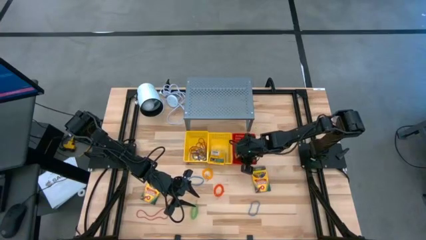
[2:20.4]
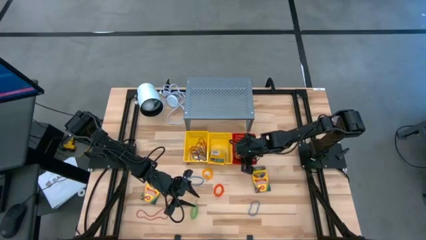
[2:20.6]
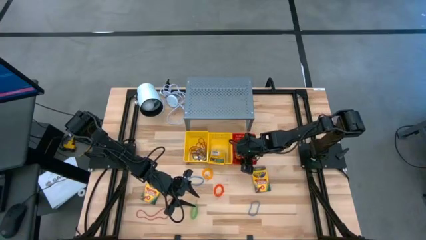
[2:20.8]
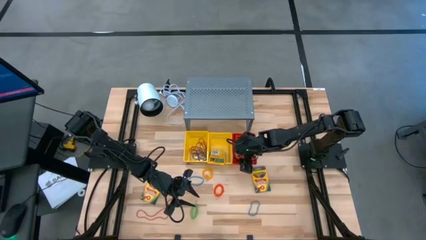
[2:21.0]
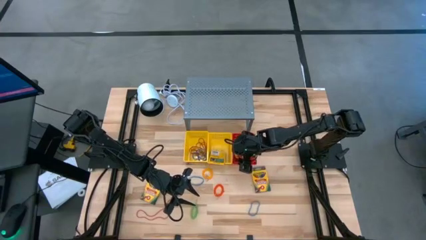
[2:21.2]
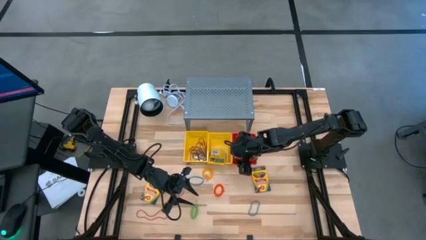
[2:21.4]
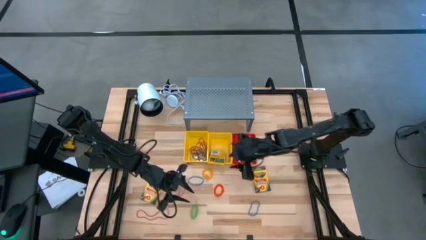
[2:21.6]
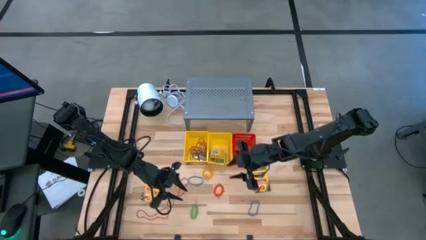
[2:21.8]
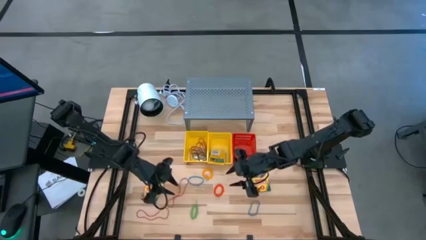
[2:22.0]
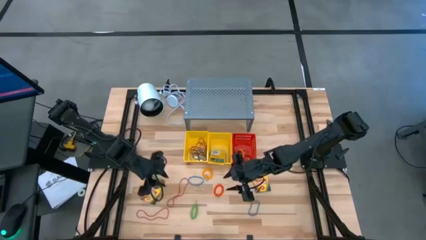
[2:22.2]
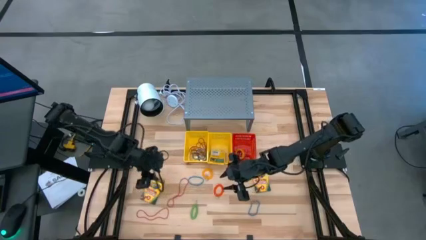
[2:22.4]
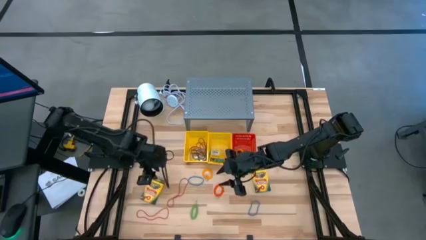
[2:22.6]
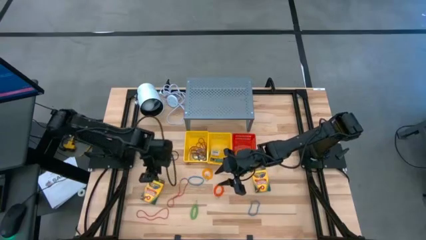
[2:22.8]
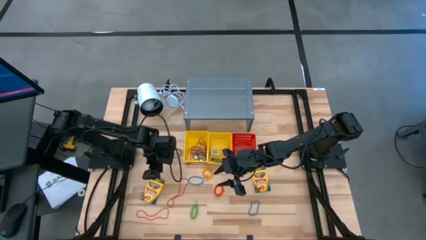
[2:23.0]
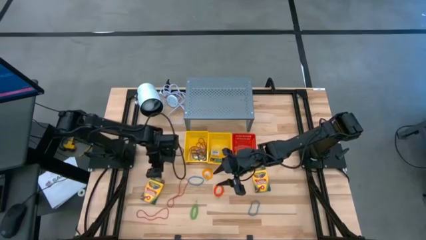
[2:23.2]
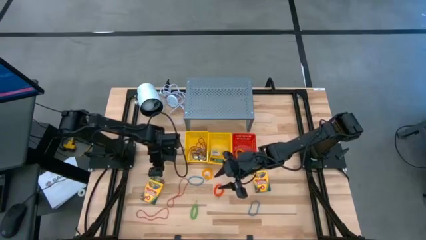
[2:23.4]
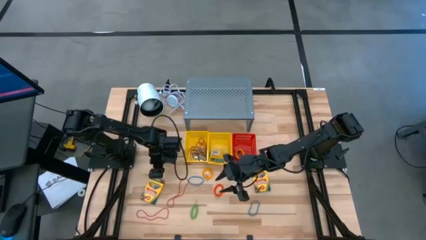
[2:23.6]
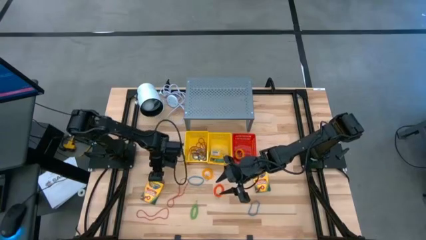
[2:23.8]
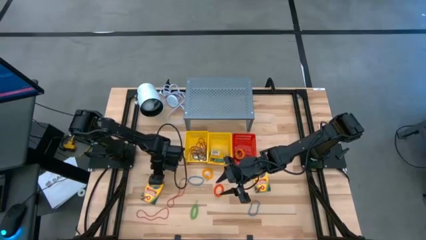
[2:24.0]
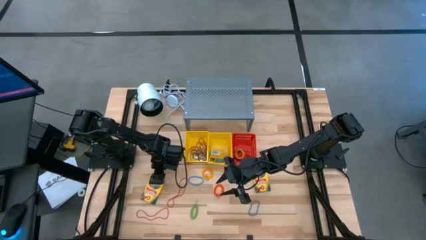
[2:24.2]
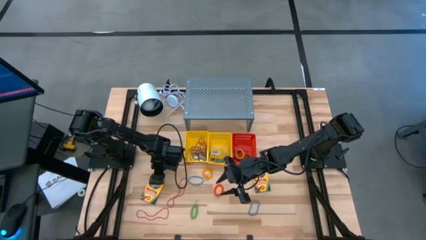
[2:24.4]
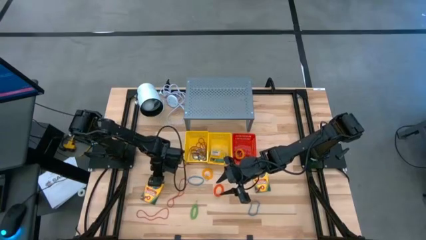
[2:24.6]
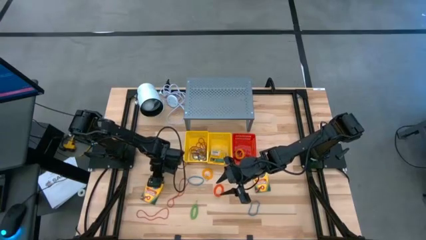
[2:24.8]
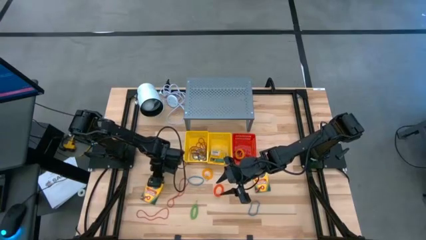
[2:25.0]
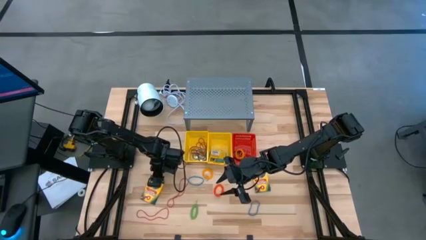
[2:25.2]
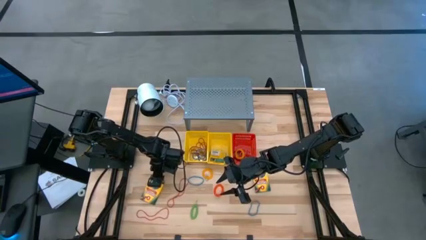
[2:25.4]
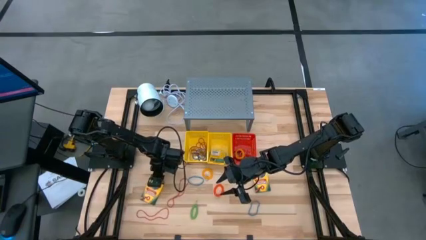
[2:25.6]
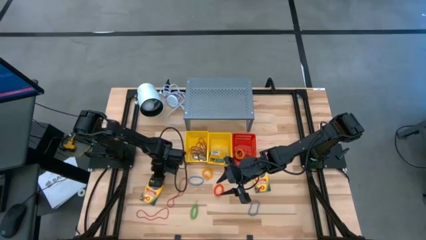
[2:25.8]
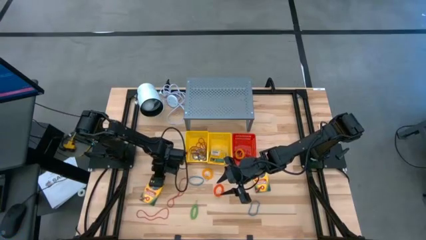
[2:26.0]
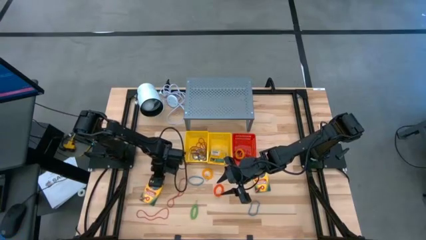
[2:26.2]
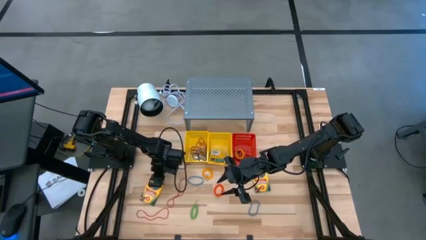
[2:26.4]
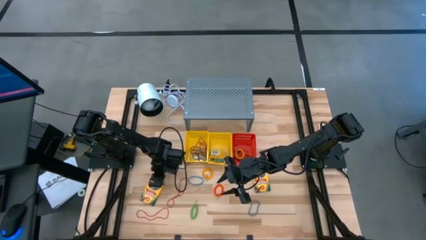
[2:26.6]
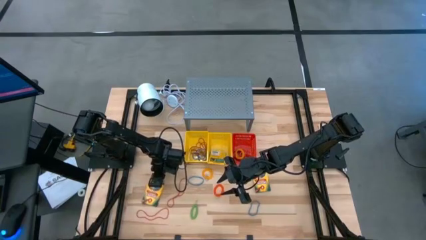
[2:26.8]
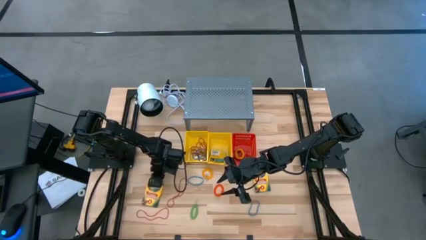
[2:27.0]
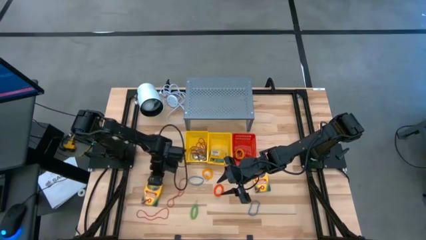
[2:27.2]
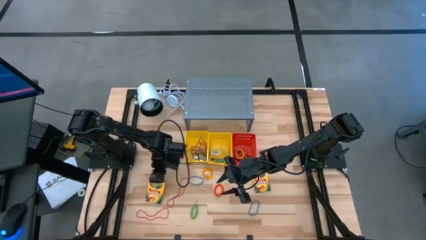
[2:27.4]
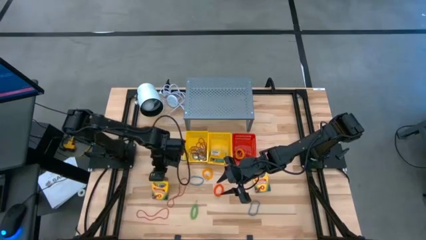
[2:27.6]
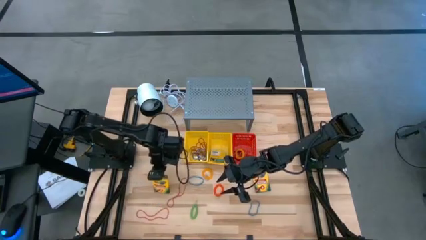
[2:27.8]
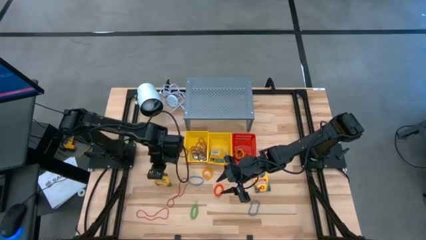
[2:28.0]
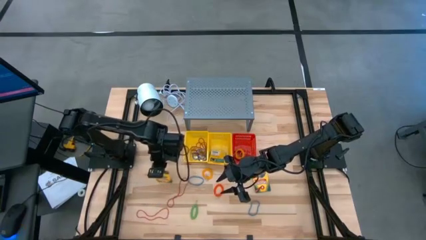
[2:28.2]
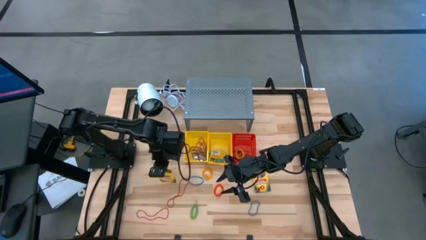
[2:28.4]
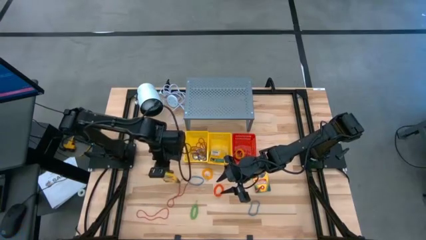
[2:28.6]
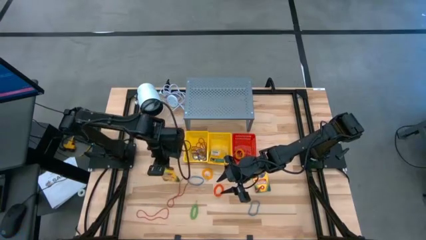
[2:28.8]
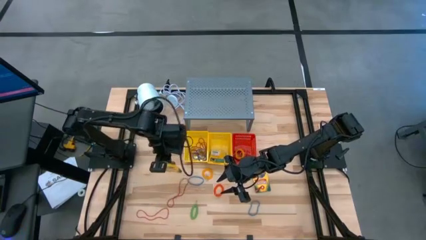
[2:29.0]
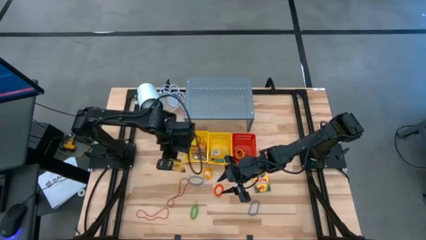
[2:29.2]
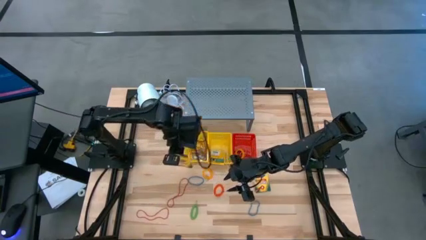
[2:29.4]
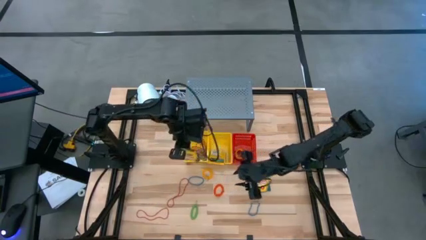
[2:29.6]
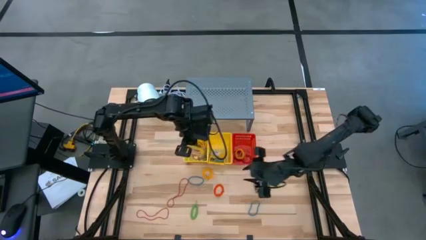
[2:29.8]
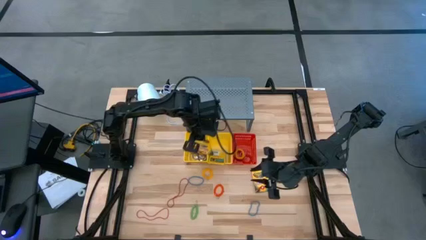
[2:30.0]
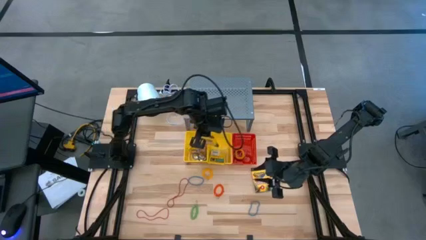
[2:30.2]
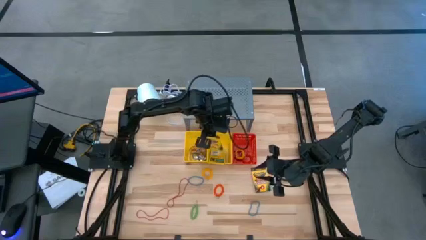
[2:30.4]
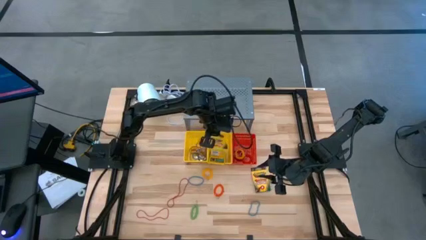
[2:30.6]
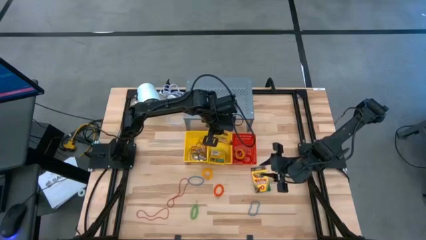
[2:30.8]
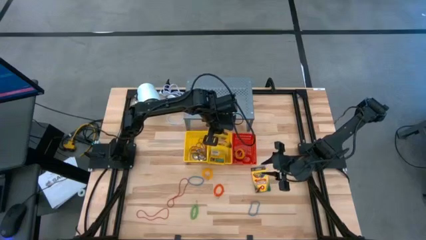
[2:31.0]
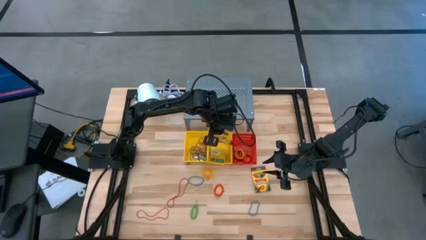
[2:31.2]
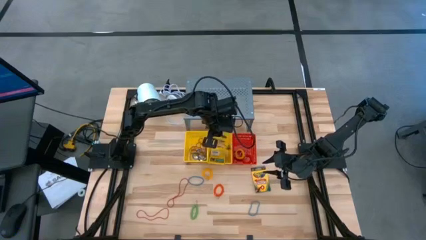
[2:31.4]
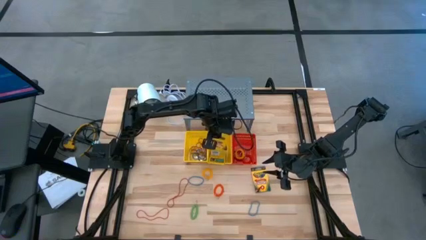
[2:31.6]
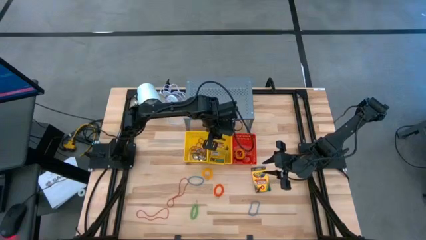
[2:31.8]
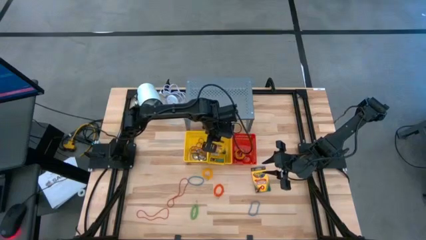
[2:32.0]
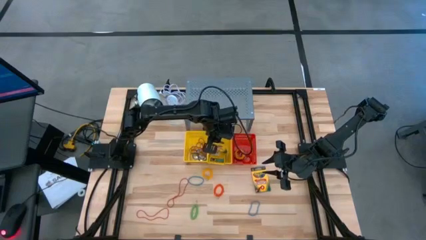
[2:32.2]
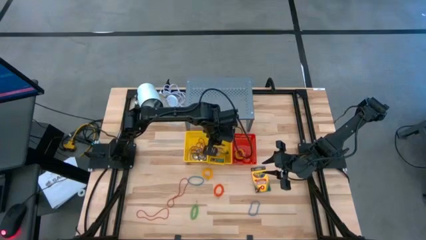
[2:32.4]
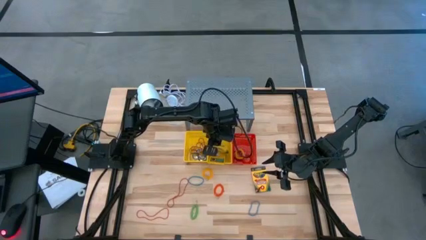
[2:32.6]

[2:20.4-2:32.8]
Task: Pick & Place Office Desk Supplies
Put the crayon box into the right yellow basket

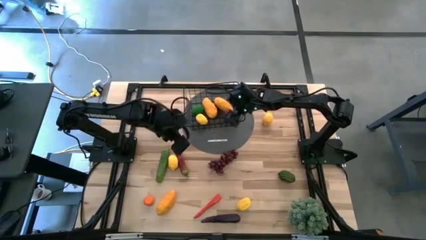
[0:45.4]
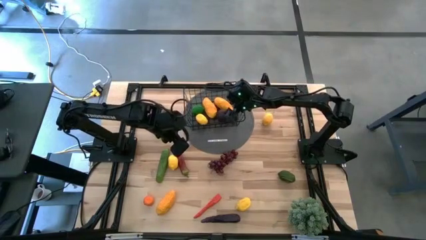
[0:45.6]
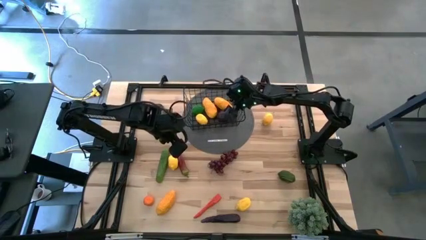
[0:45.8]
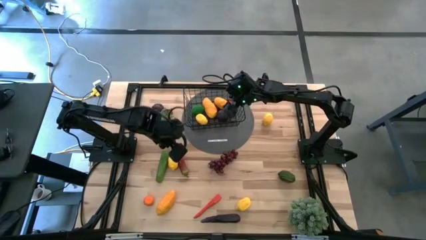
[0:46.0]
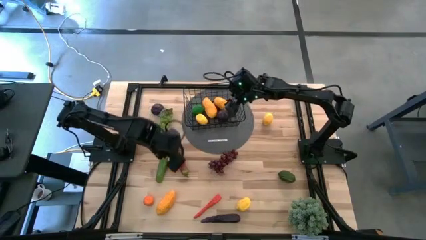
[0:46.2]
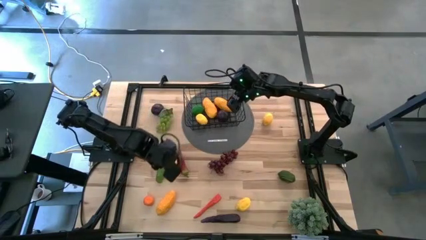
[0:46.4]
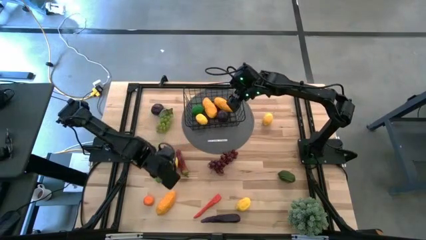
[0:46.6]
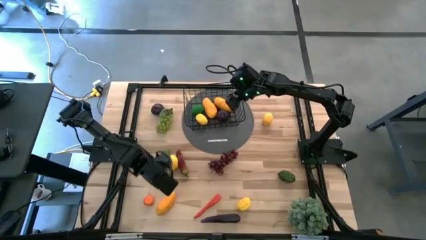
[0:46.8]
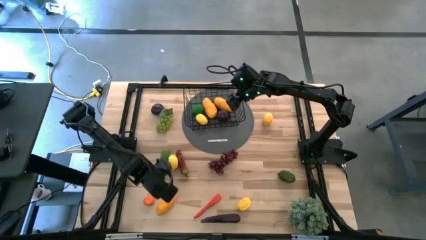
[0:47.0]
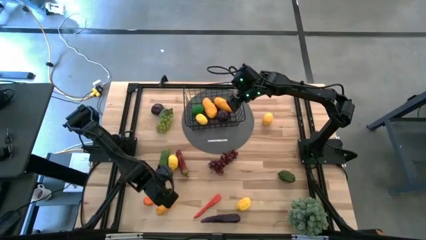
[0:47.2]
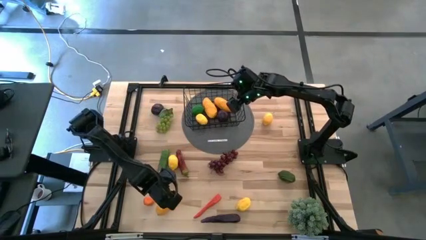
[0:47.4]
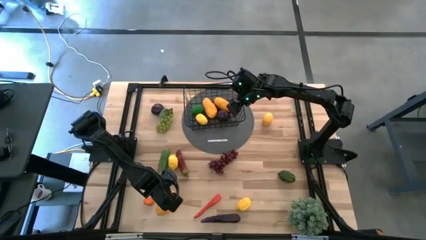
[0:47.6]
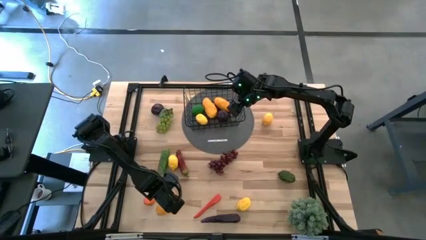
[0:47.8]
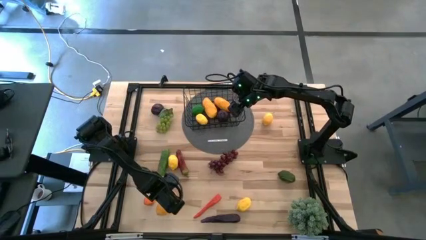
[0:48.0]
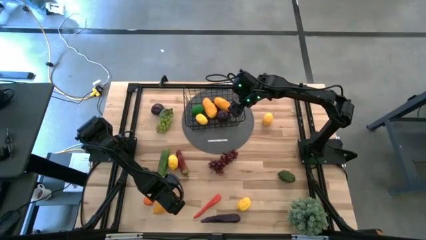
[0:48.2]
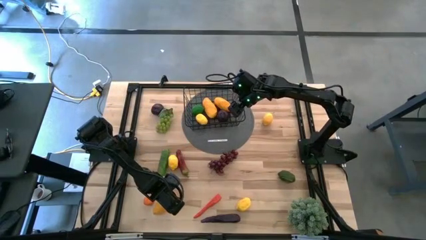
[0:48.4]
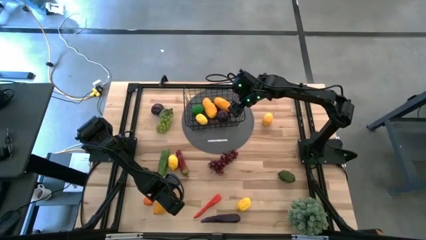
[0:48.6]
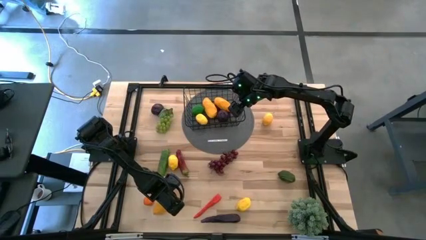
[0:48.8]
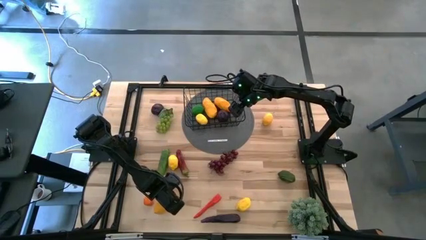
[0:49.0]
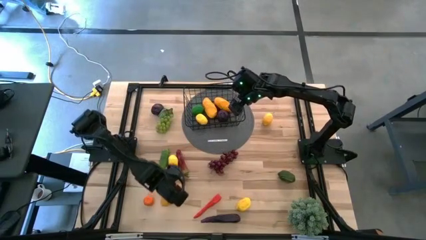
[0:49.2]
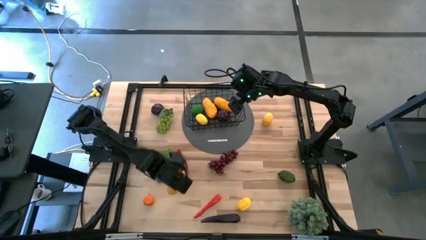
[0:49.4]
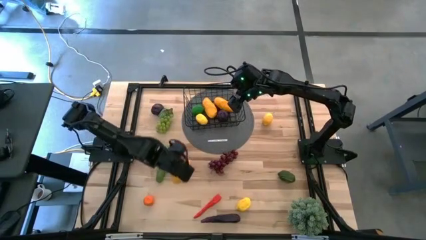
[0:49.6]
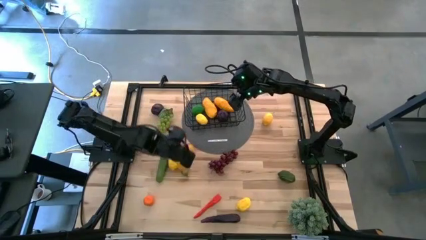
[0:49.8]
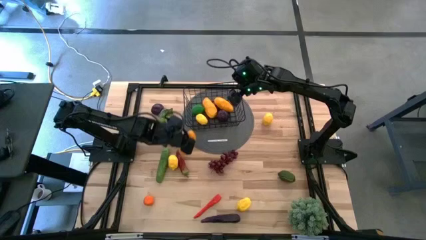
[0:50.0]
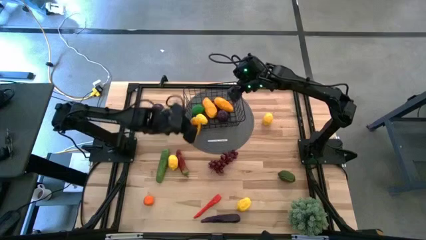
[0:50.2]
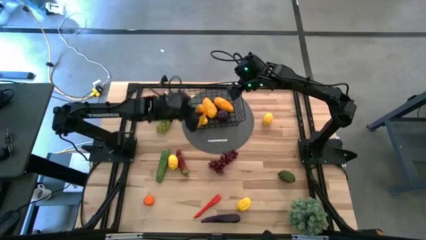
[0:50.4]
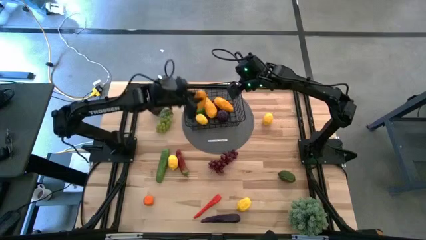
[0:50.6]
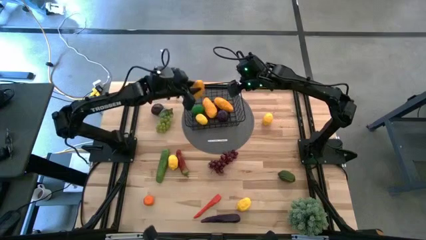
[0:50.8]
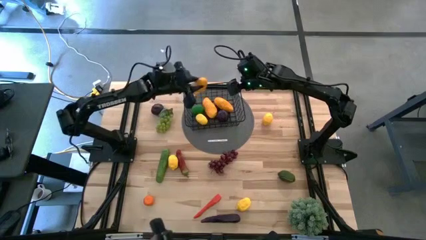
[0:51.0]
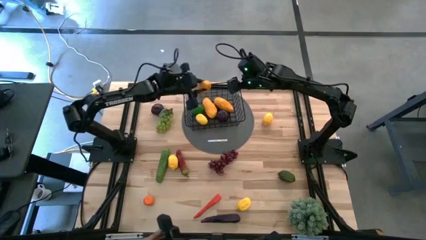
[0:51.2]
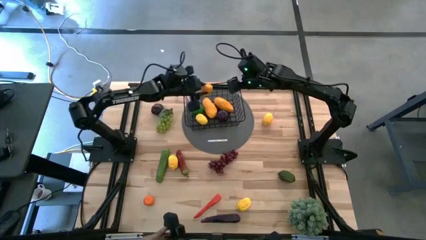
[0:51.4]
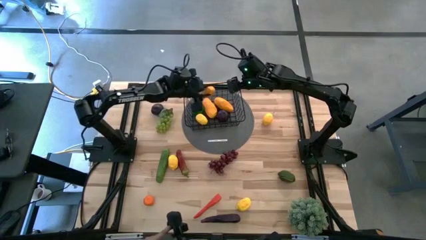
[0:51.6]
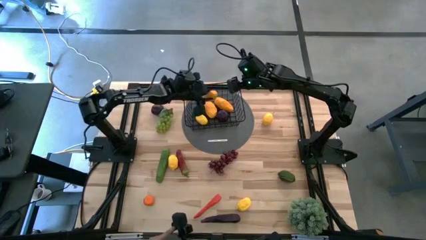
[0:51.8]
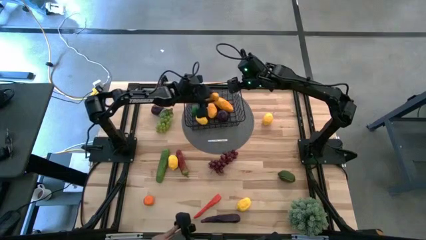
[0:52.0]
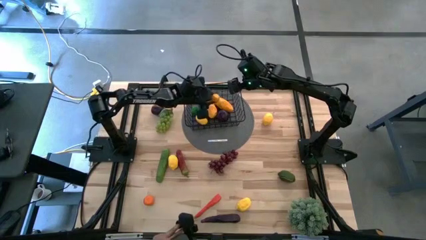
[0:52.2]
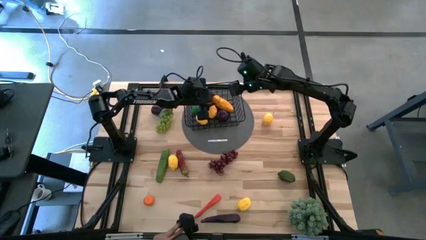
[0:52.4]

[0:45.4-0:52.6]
Task: Build produce basket
Put the mango into the wire basket
